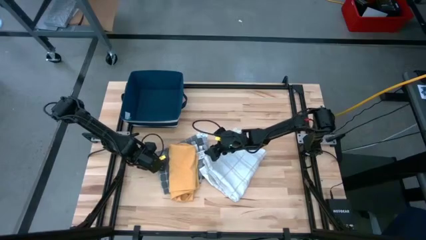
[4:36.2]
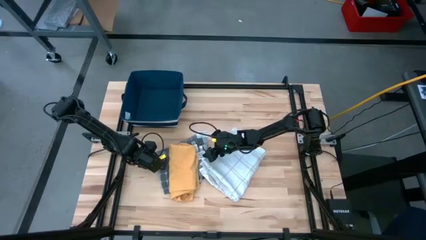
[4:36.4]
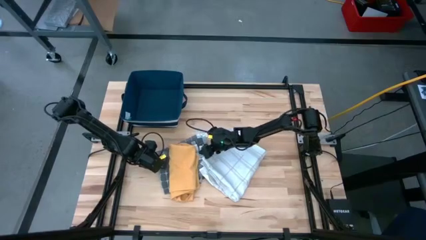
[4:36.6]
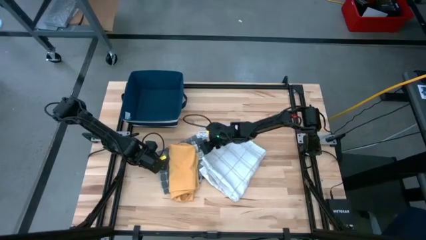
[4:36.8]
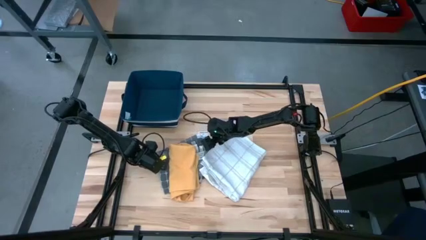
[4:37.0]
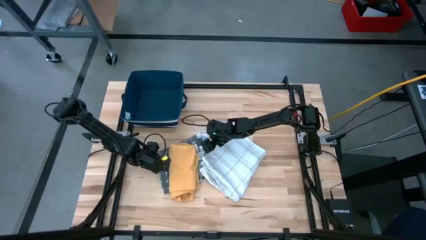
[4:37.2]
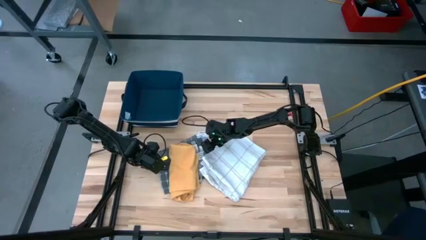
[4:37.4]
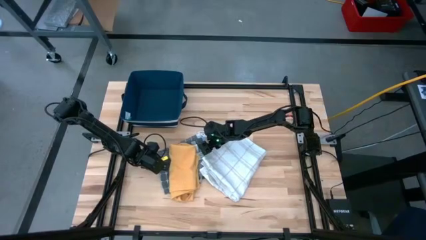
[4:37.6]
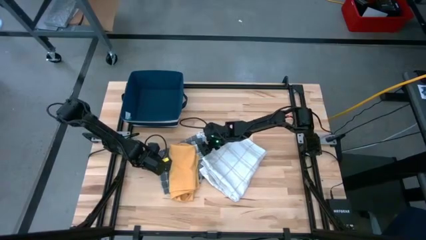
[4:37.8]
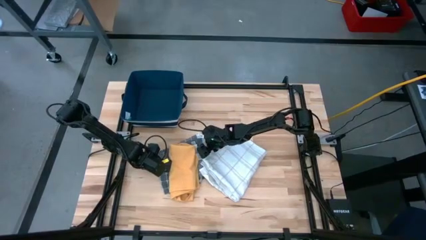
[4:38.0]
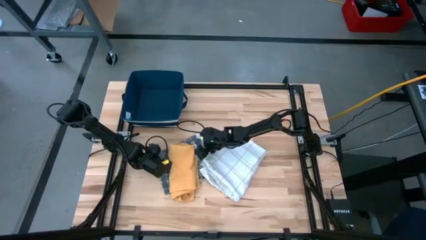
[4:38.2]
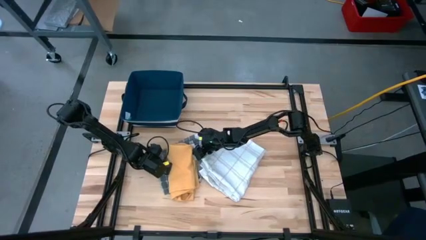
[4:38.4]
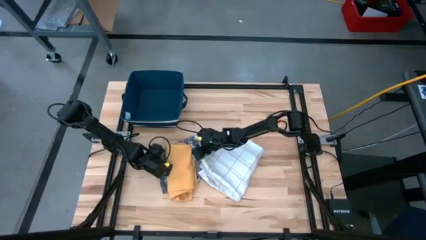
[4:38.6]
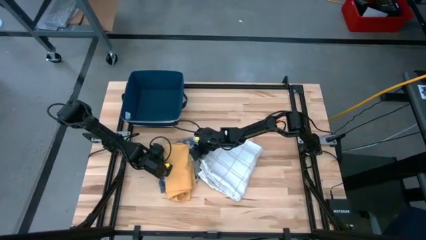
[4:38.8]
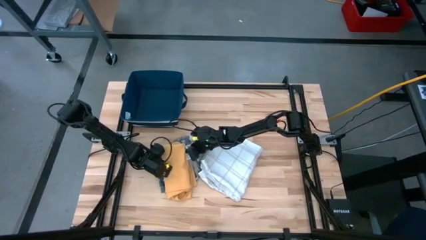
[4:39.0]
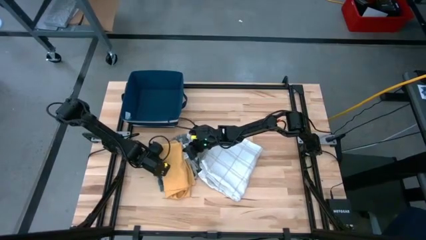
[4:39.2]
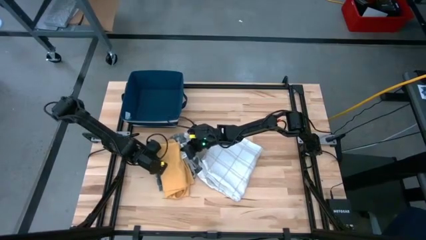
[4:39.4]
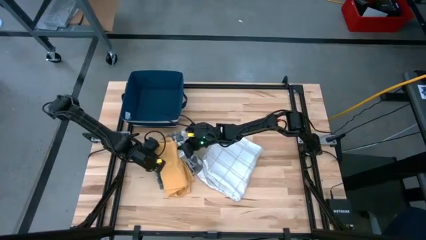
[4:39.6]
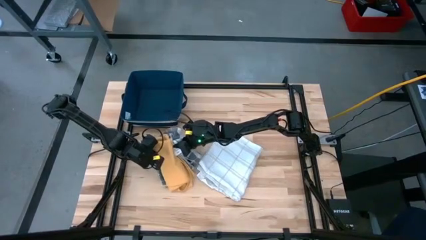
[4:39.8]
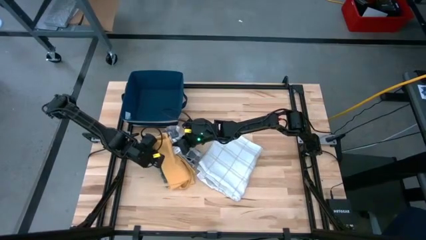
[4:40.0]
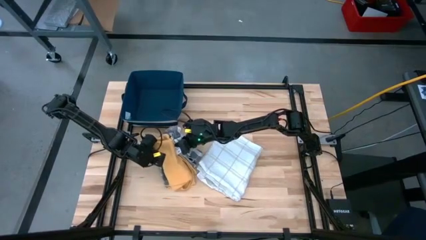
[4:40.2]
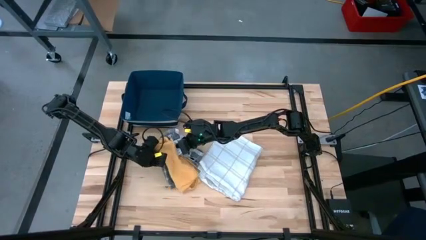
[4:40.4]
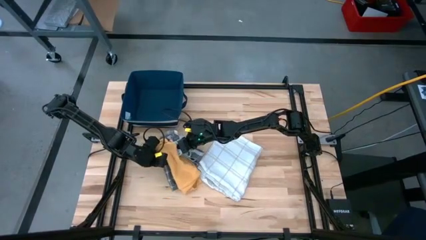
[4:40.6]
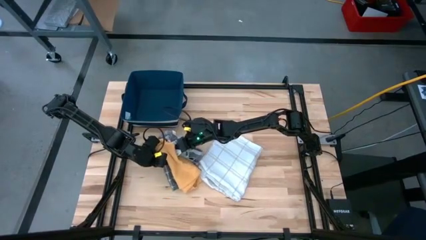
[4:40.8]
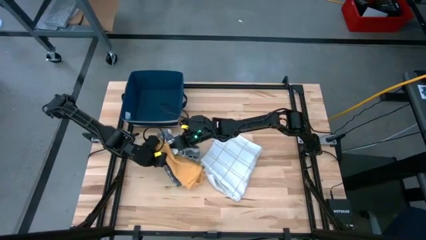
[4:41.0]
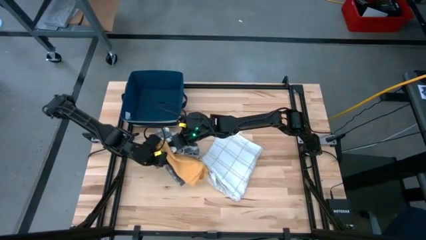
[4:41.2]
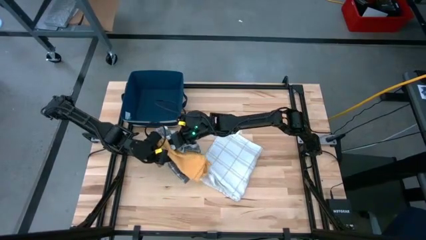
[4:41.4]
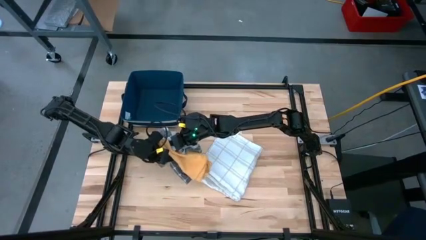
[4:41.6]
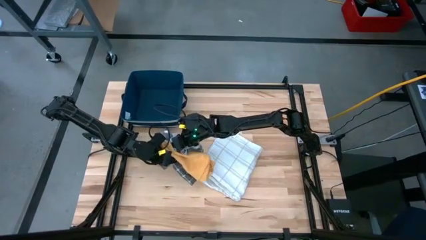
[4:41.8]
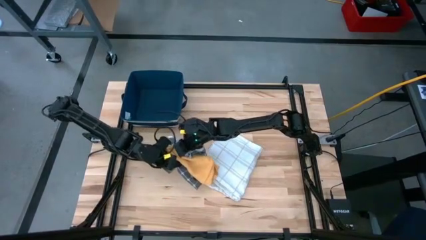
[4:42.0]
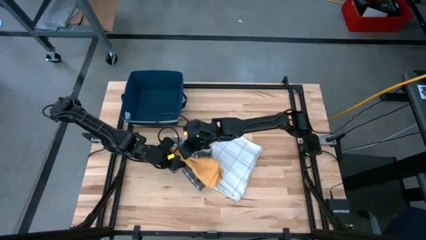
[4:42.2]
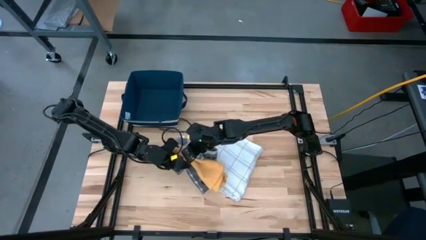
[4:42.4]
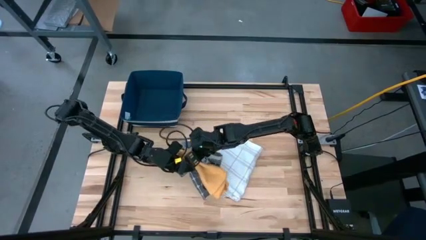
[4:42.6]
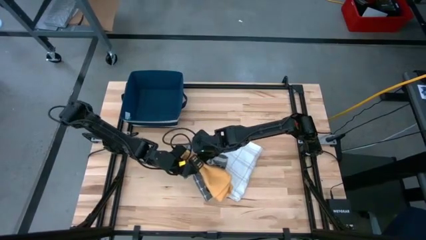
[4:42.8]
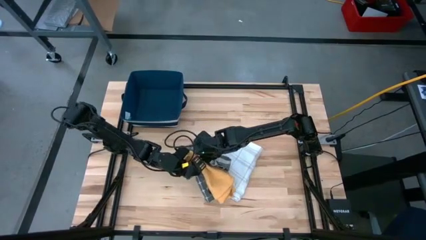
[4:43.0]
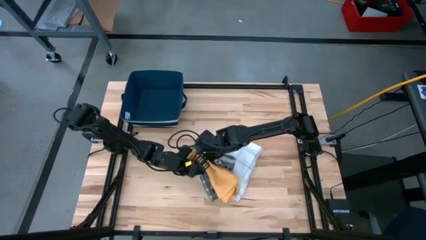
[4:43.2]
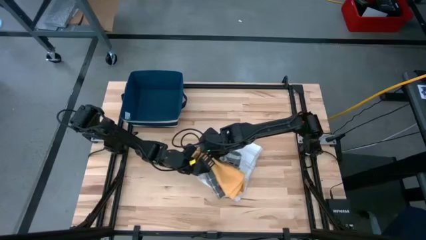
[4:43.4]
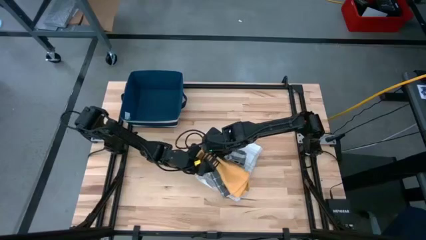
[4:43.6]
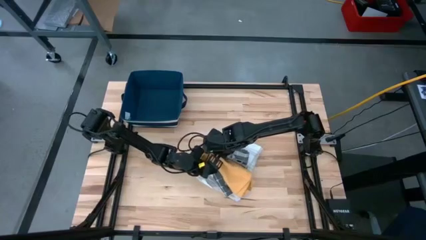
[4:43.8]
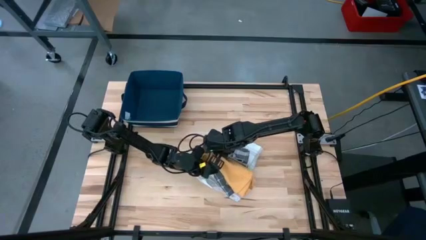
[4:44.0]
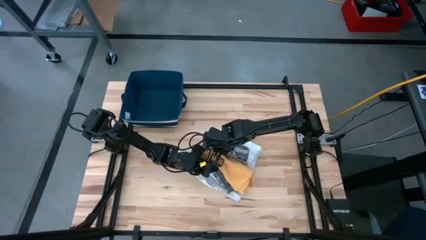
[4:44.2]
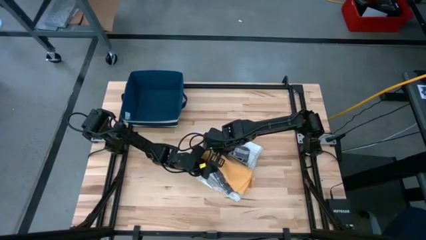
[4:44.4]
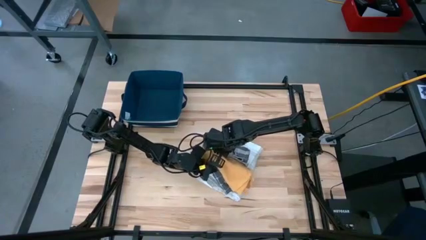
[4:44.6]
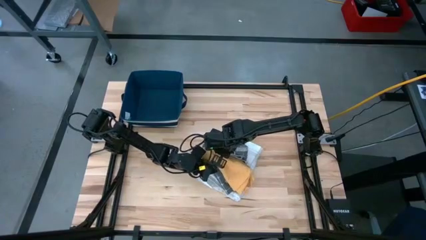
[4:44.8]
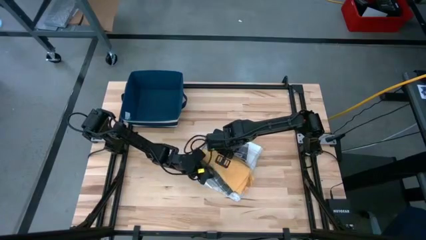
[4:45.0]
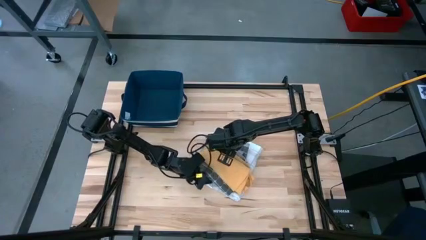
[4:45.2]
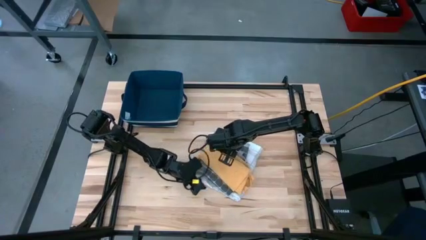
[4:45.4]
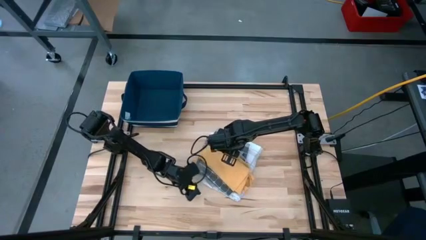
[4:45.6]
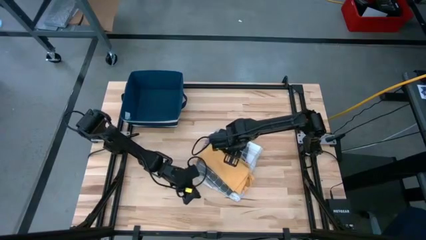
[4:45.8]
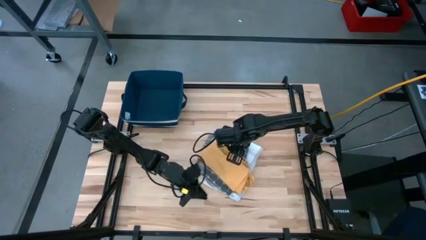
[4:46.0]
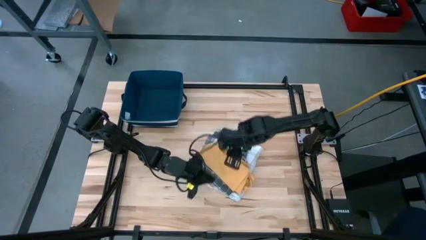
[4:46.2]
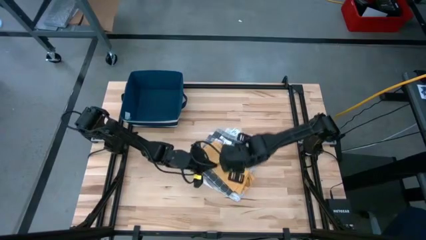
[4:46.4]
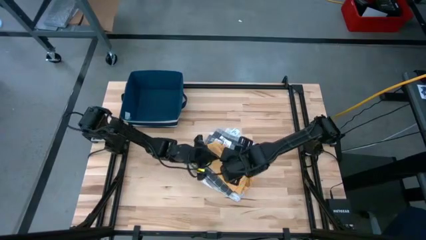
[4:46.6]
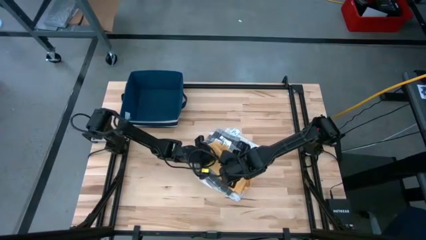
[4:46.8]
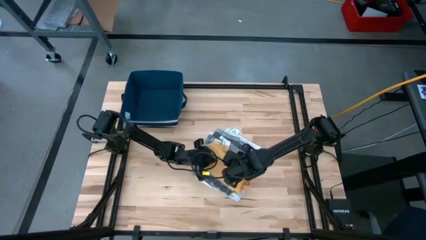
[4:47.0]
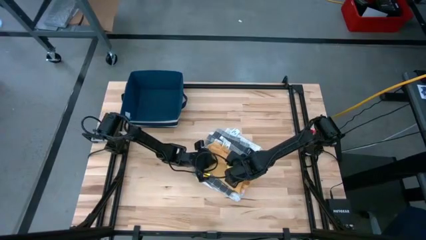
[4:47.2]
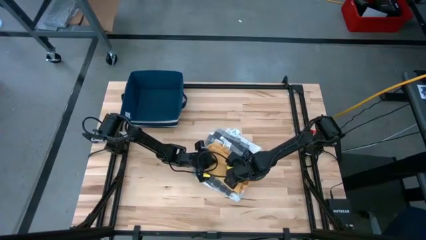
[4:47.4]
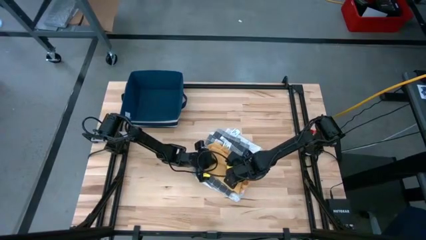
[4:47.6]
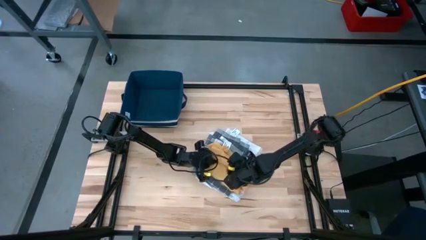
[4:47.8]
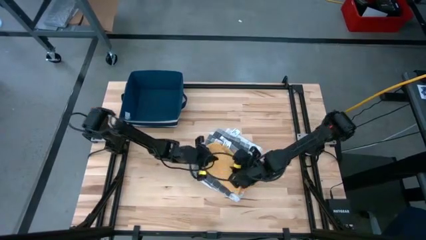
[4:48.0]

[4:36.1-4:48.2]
Task: Fold towel
Stack the stacked towels on top of the white towel
